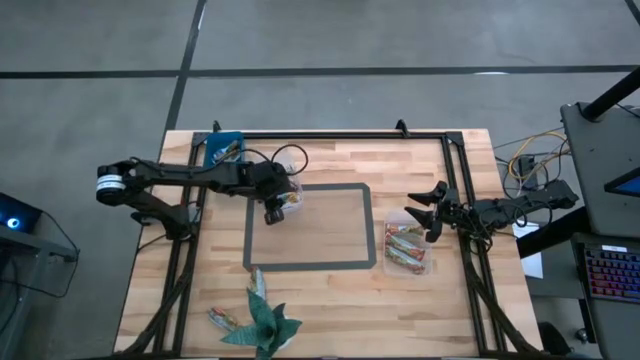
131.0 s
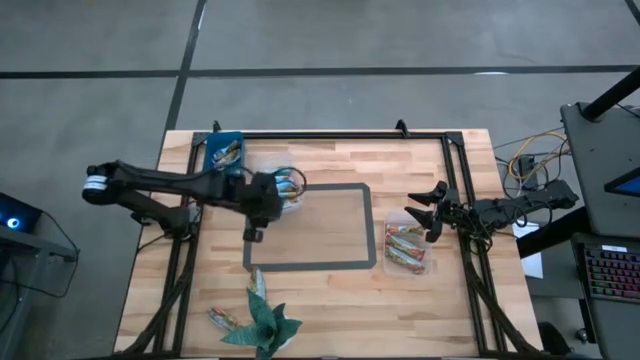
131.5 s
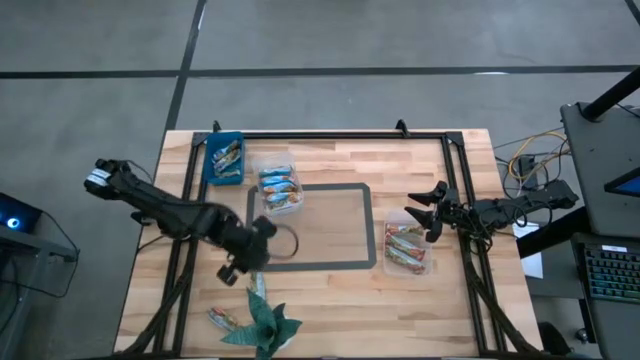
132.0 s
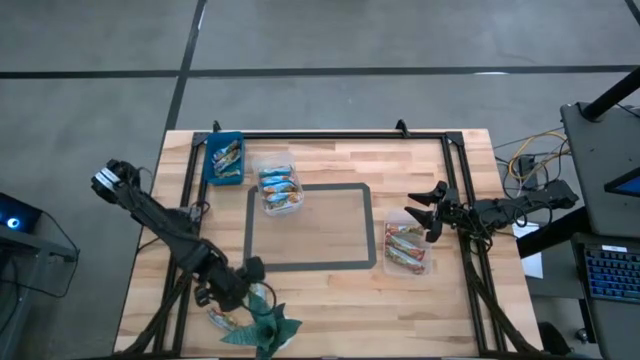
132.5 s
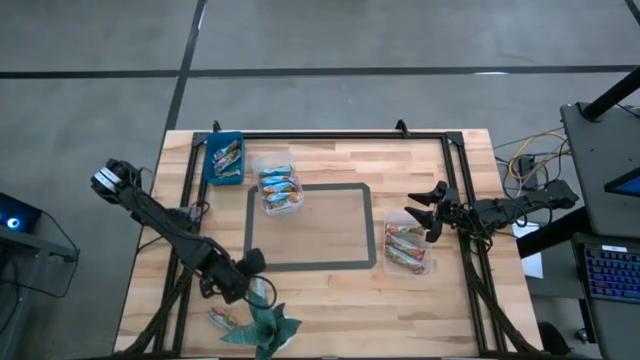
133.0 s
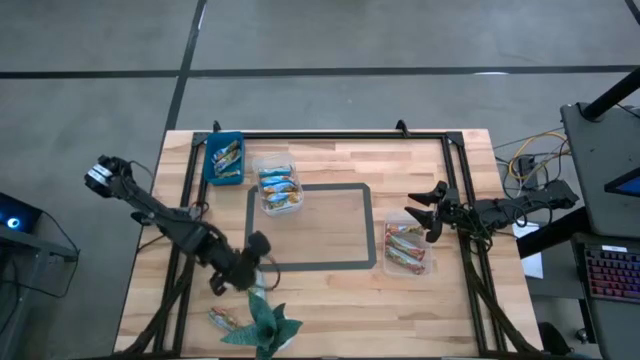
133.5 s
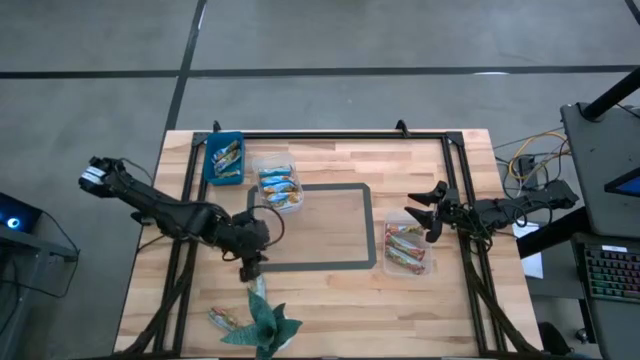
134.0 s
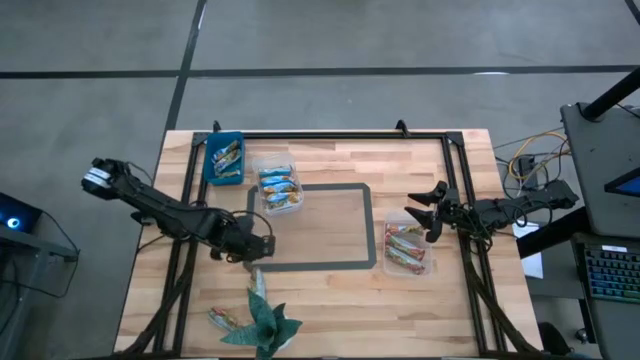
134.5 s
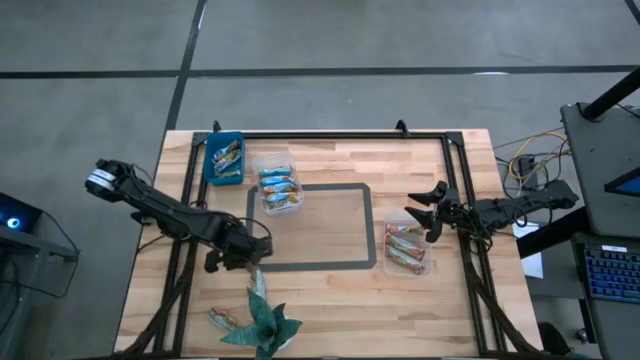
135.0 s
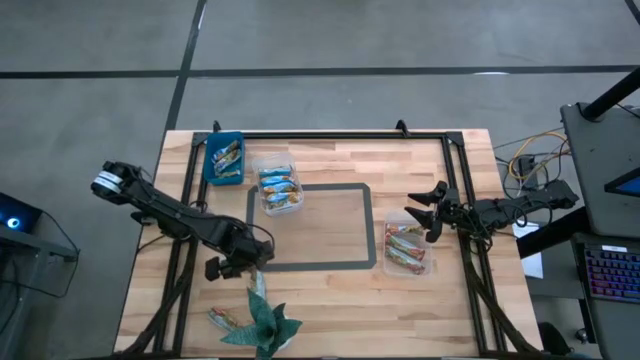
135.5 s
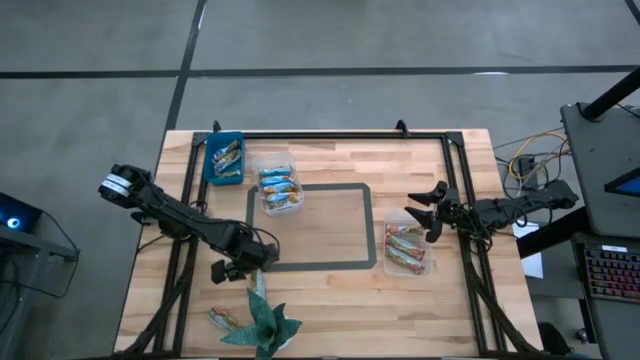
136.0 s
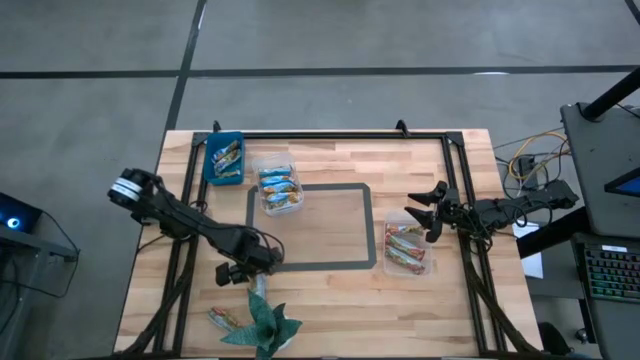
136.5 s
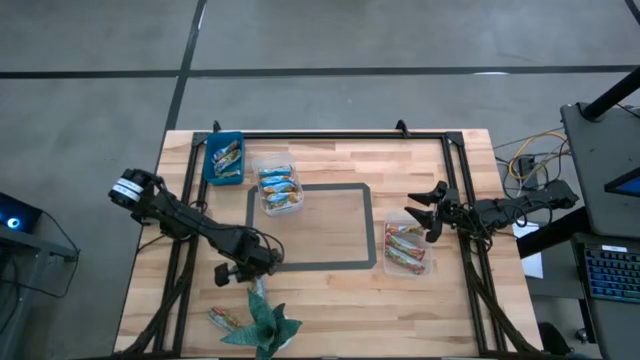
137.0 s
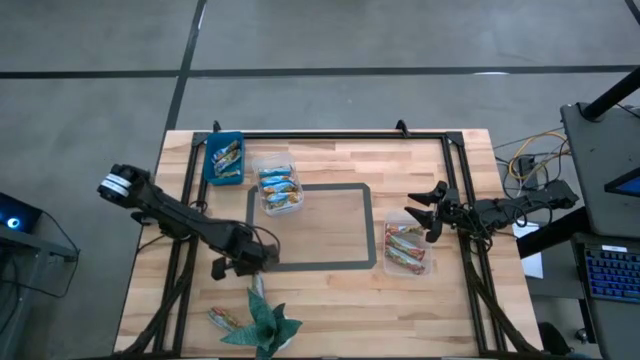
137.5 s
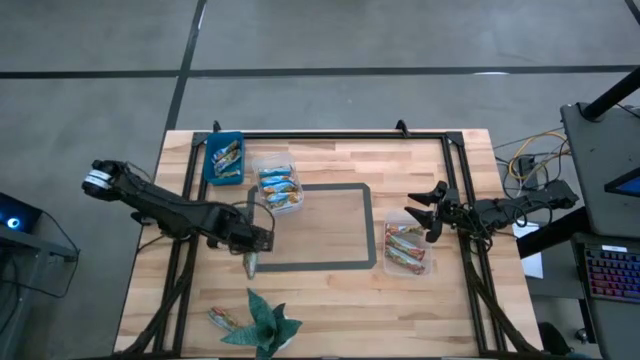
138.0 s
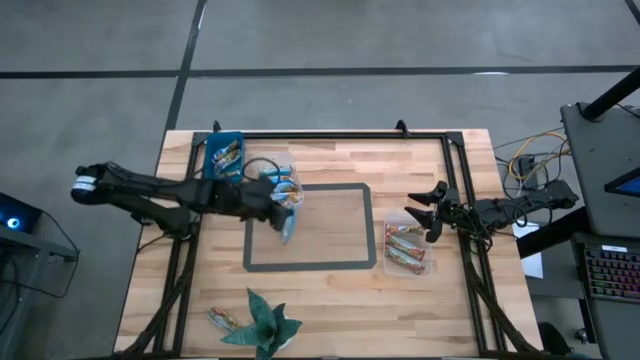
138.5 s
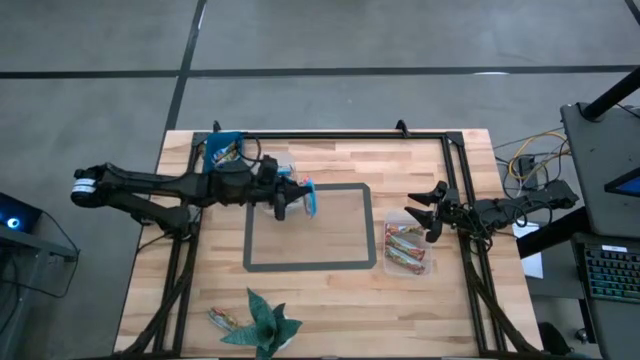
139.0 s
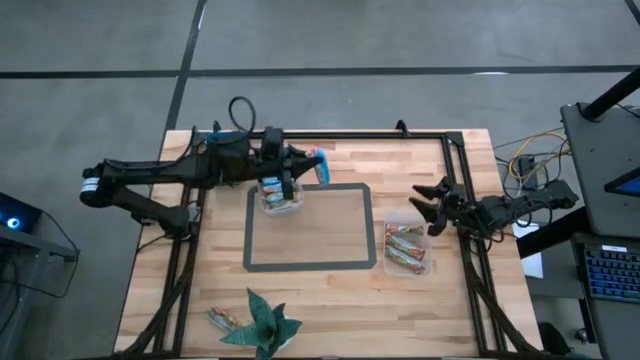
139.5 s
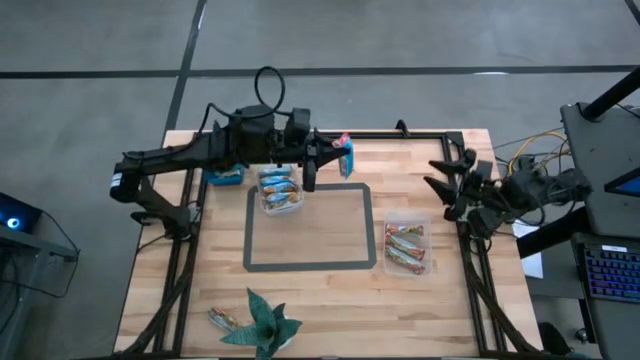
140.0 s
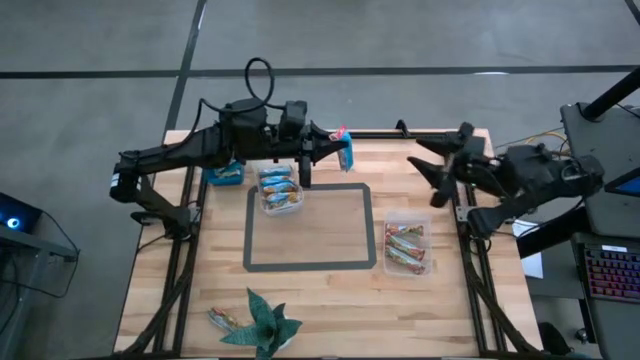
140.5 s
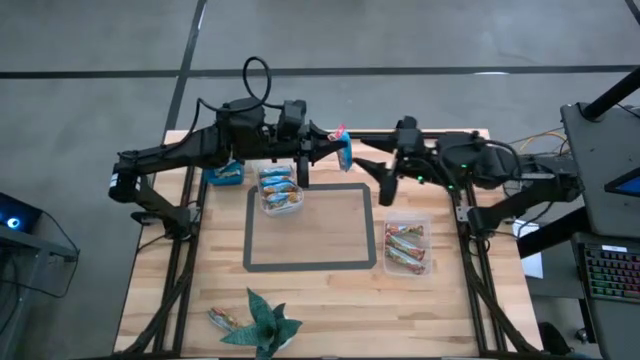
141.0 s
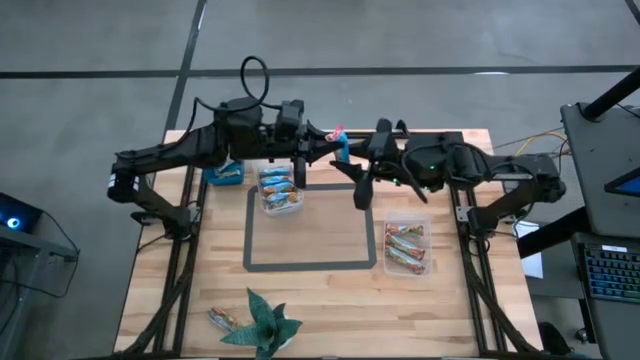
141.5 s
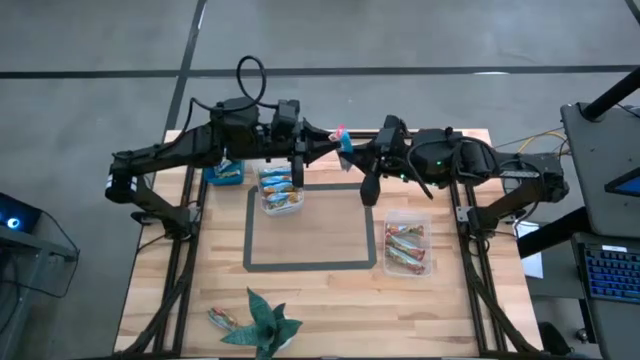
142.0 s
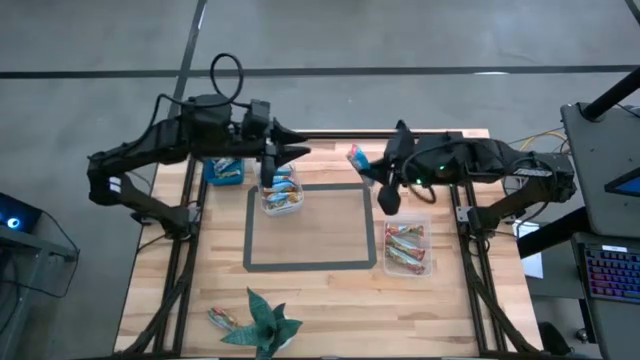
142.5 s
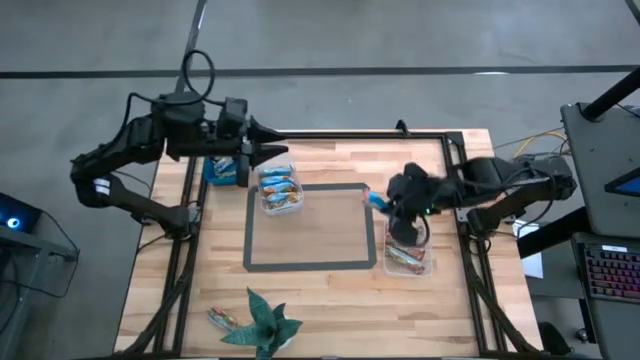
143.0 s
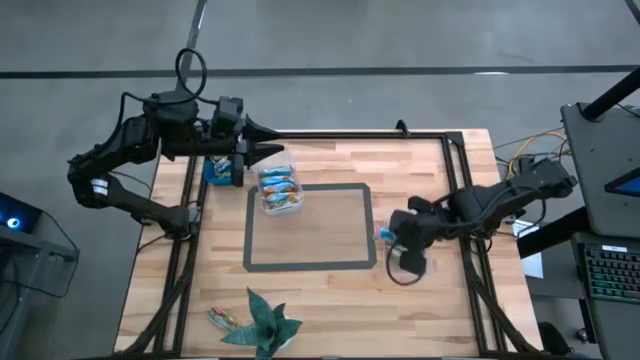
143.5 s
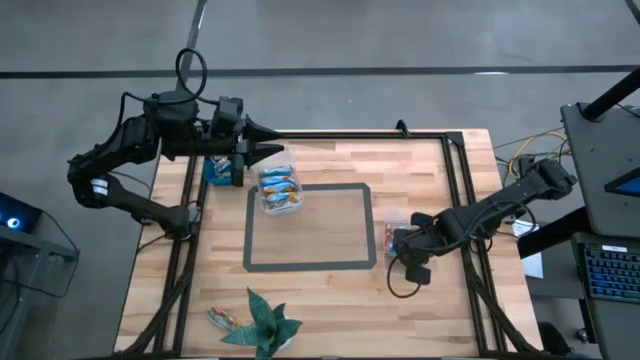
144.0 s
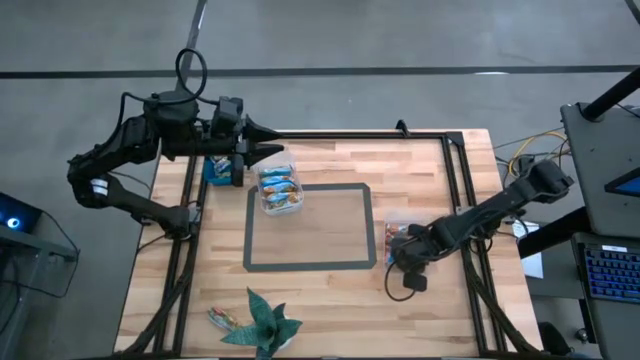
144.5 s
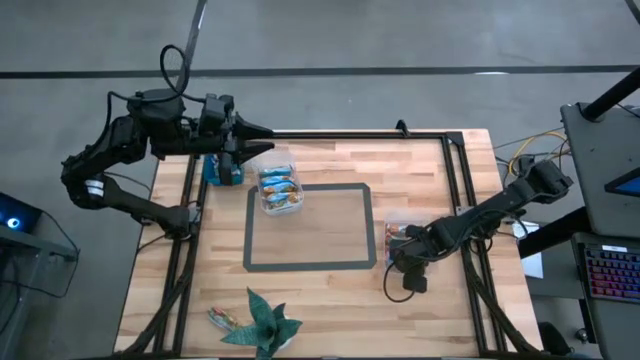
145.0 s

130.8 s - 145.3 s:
Task: Pick and place Granola Bars by type
Put the red granola bar into the right transparent bin

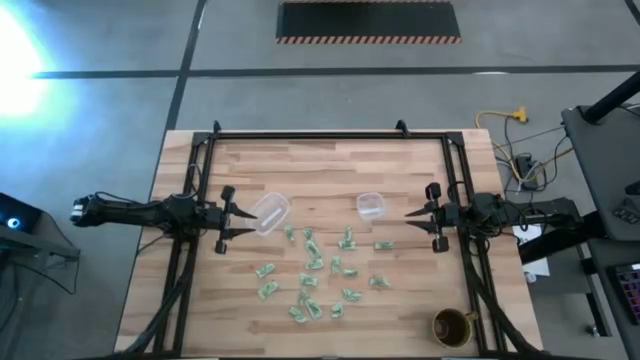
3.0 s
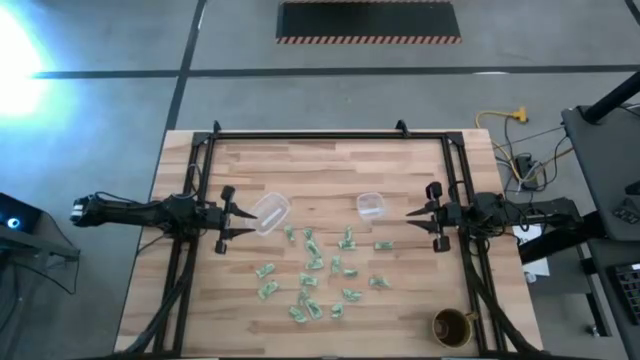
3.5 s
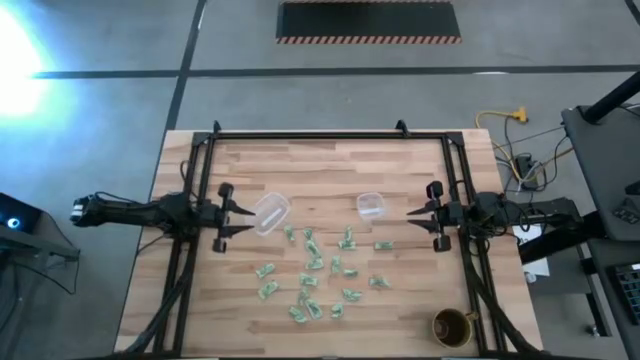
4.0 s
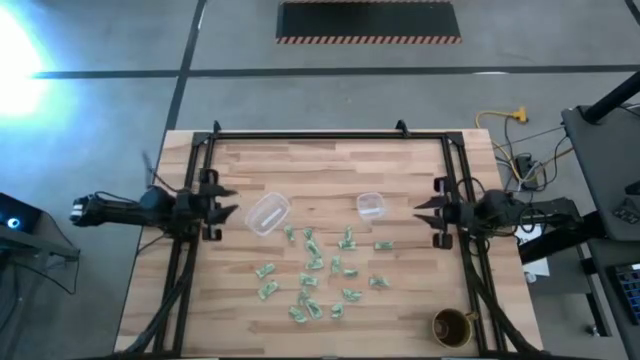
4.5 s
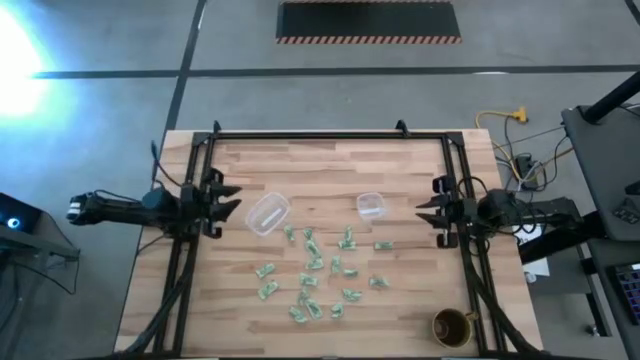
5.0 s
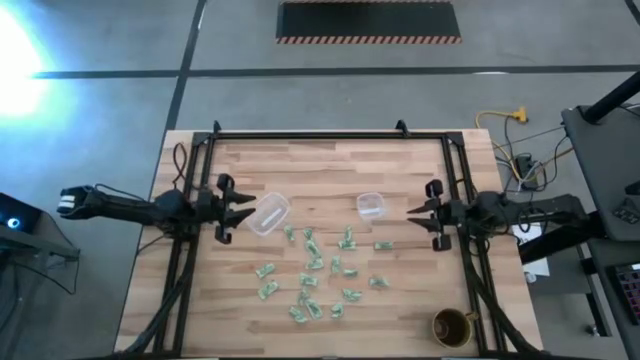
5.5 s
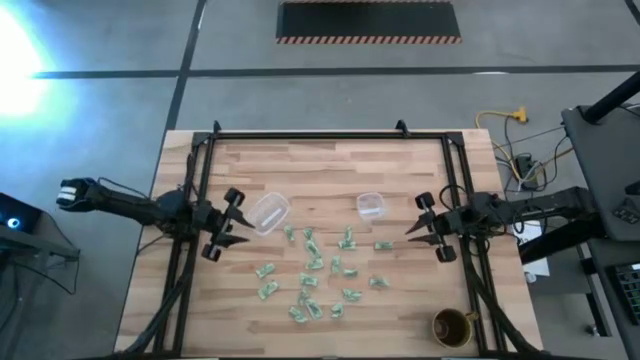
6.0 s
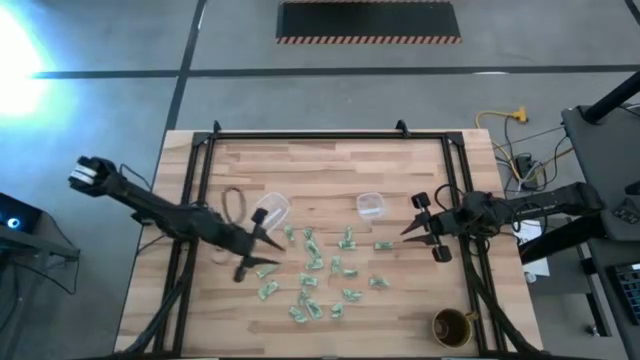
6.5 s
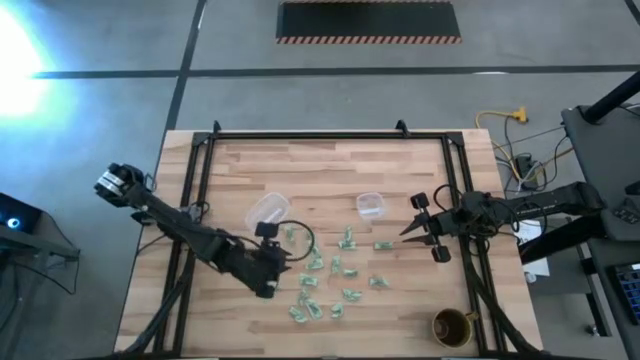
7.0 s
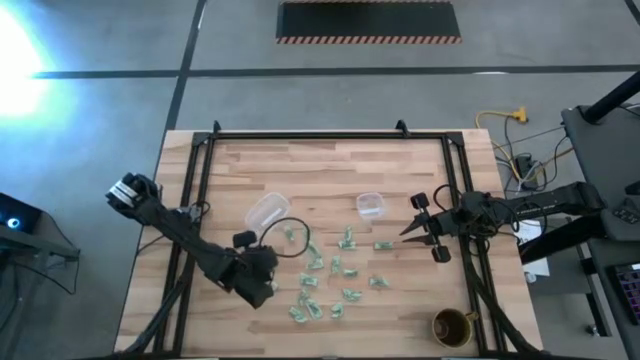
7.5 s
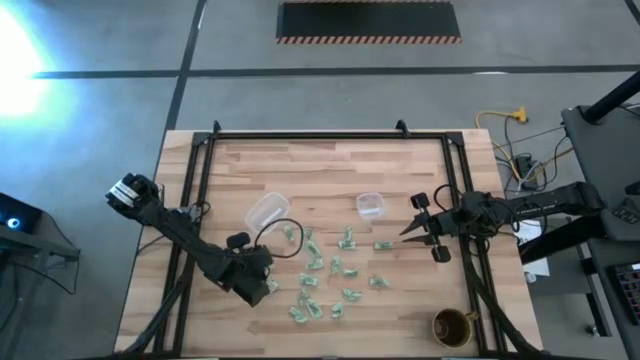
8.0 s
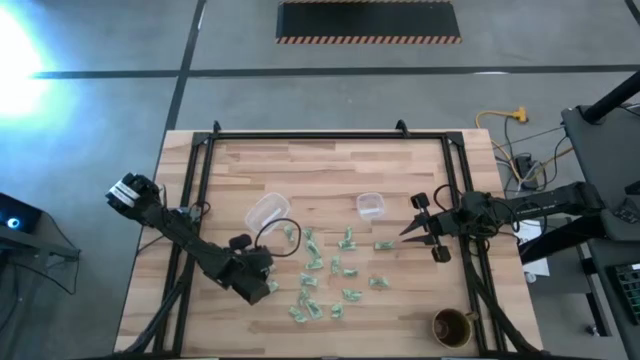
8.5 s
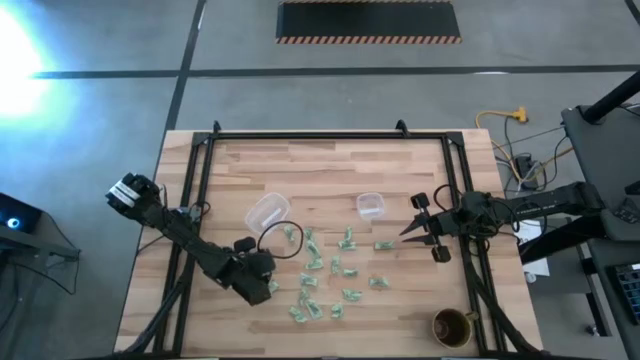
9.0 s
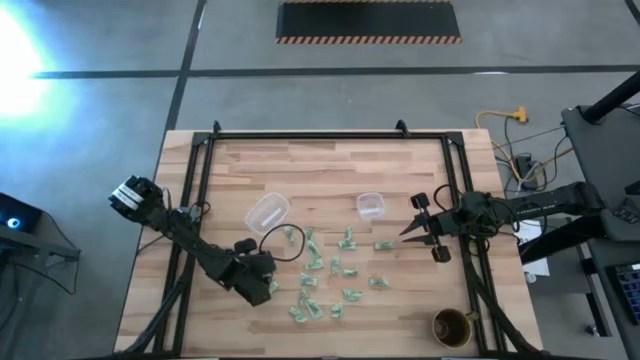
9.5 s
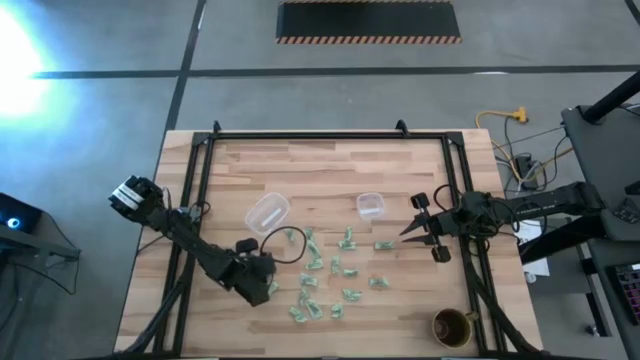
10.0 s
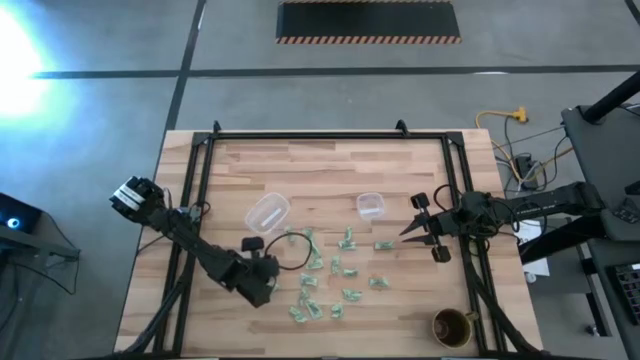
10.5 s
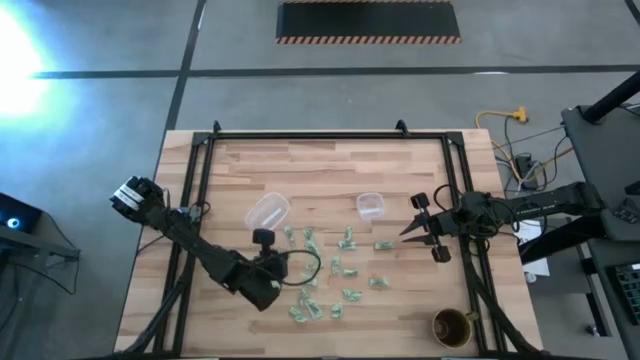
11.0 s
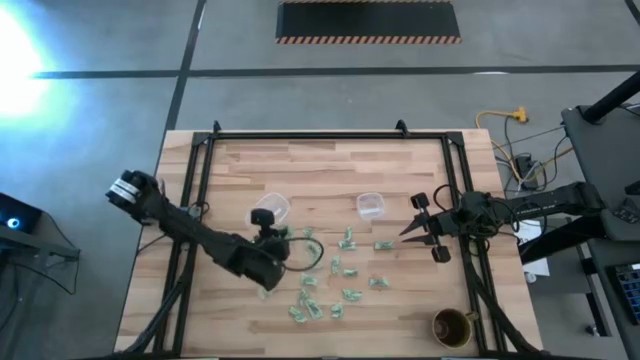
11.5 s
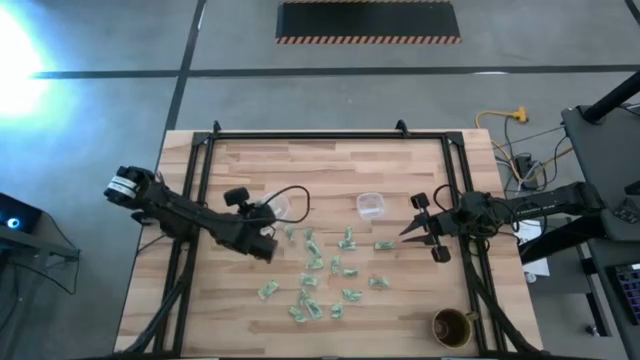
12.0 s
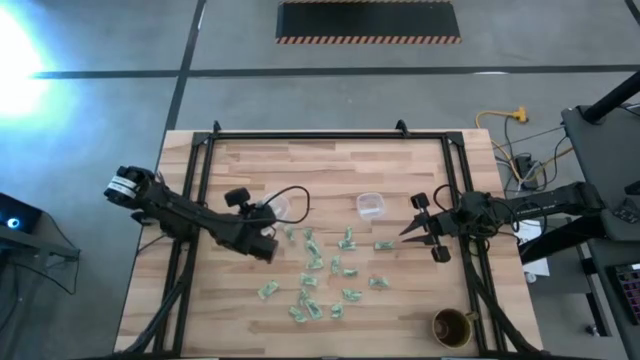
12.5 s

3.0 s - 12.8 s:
Task: Pick and place Stevia / Truvia into bins
Put the light green stevia packet into the left transparent container
